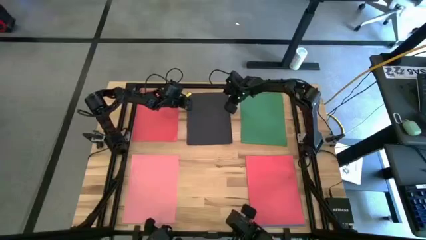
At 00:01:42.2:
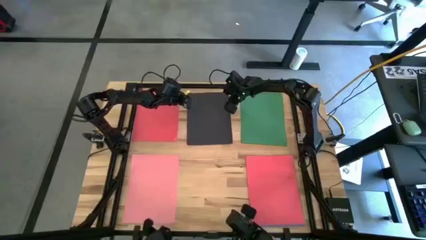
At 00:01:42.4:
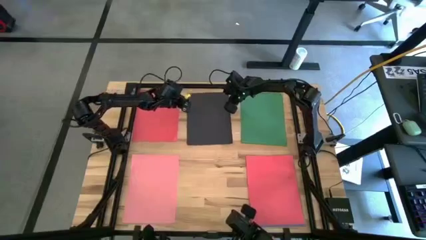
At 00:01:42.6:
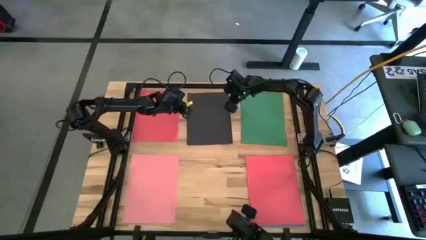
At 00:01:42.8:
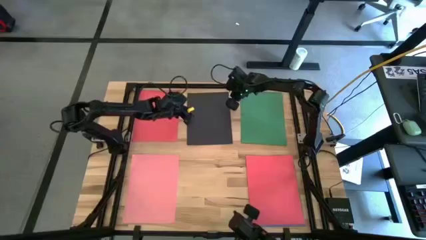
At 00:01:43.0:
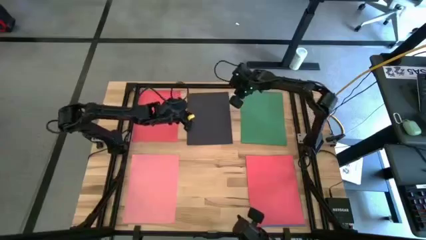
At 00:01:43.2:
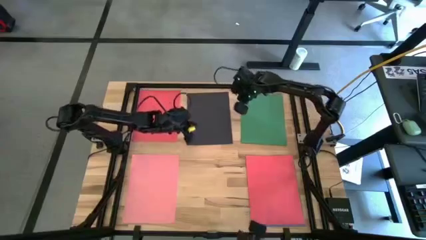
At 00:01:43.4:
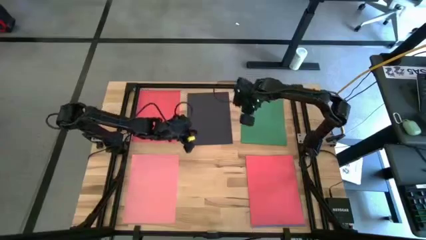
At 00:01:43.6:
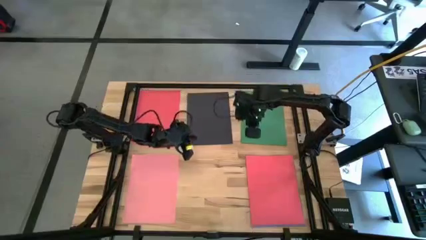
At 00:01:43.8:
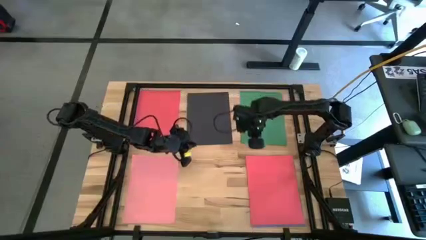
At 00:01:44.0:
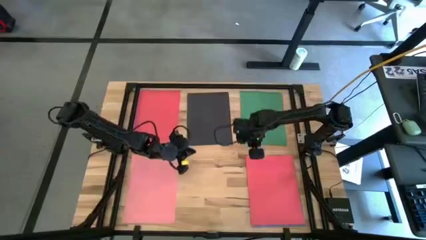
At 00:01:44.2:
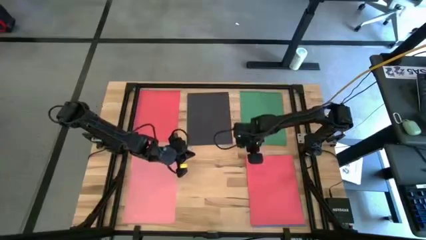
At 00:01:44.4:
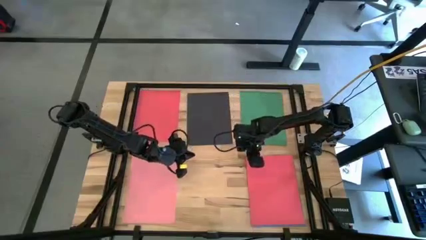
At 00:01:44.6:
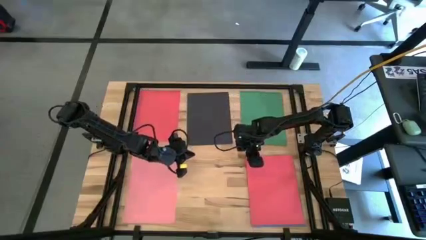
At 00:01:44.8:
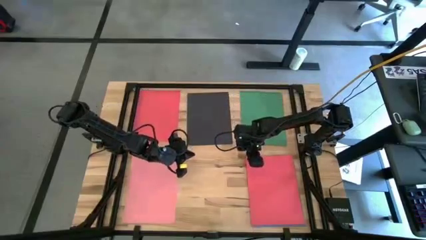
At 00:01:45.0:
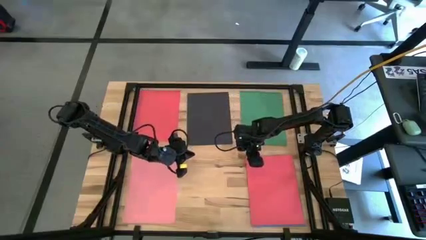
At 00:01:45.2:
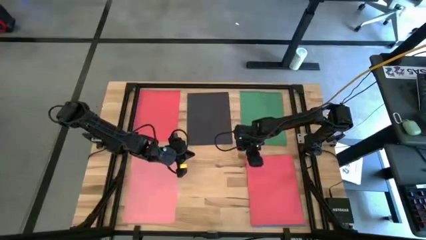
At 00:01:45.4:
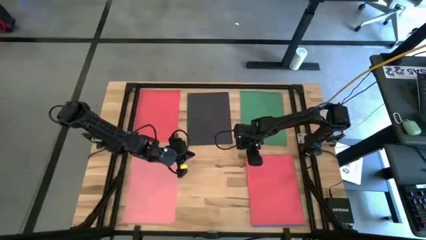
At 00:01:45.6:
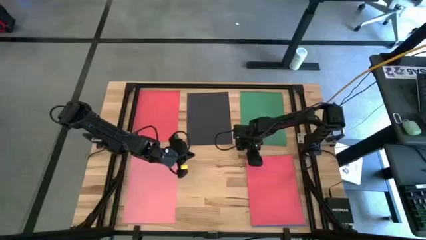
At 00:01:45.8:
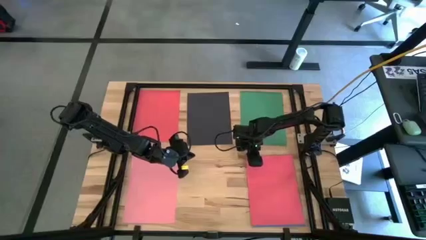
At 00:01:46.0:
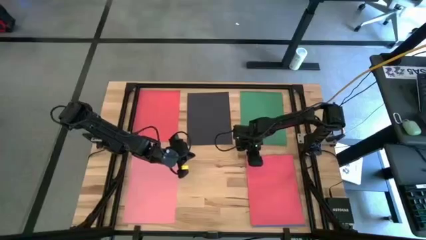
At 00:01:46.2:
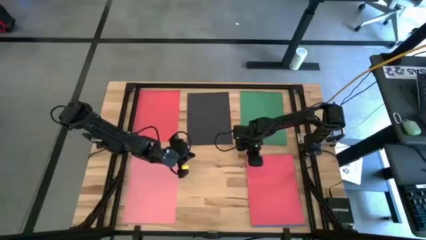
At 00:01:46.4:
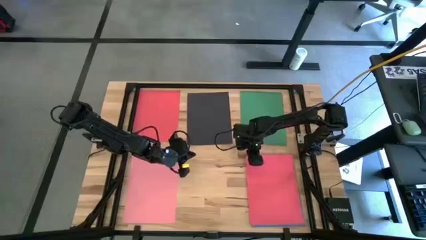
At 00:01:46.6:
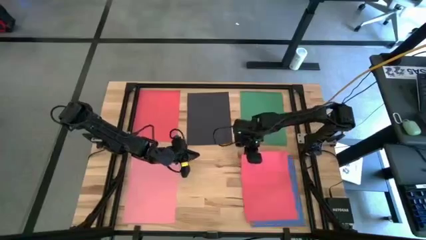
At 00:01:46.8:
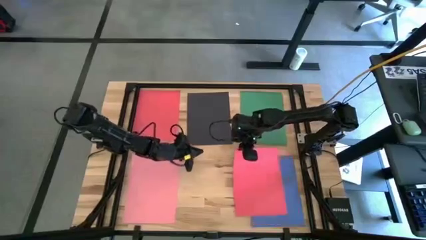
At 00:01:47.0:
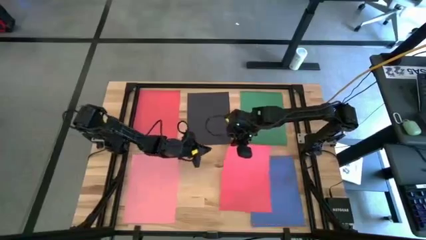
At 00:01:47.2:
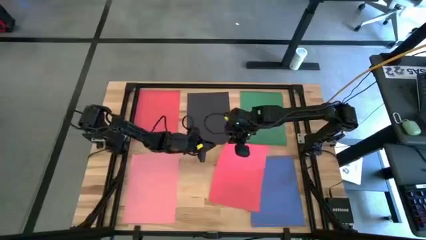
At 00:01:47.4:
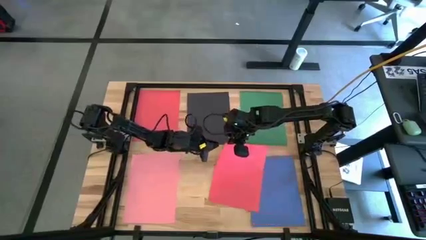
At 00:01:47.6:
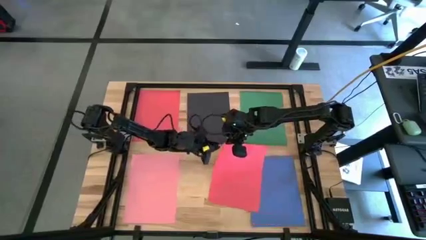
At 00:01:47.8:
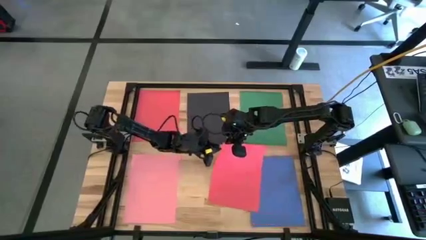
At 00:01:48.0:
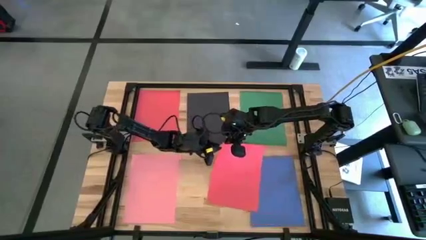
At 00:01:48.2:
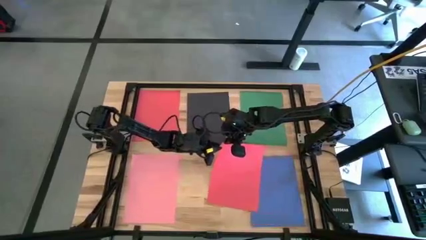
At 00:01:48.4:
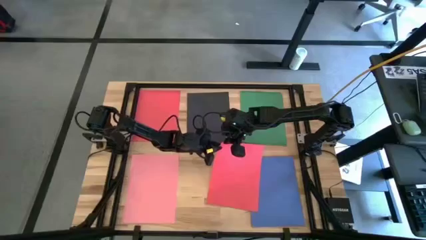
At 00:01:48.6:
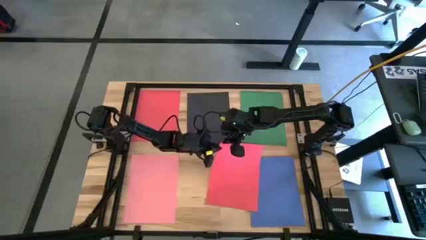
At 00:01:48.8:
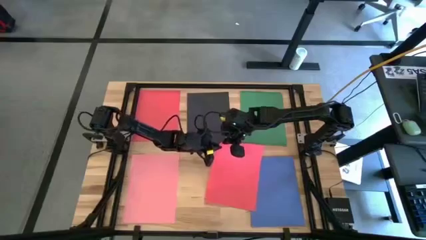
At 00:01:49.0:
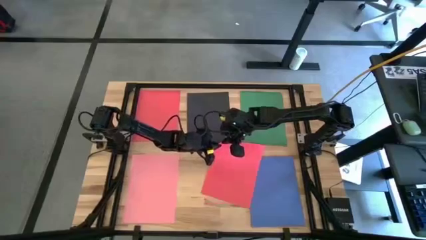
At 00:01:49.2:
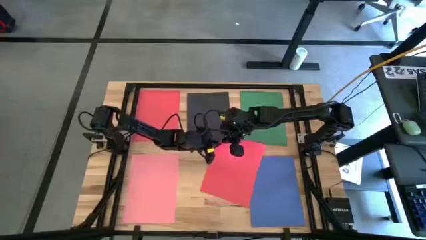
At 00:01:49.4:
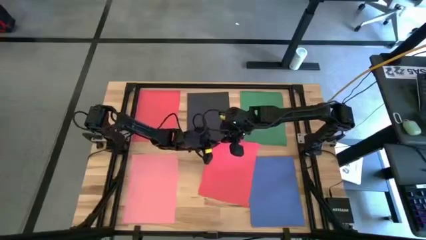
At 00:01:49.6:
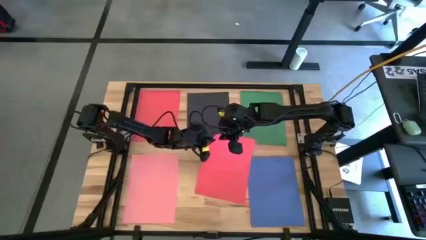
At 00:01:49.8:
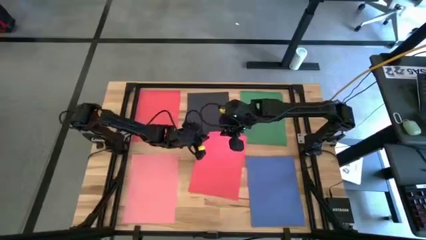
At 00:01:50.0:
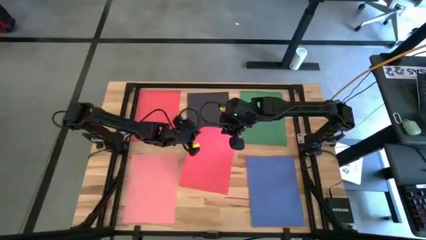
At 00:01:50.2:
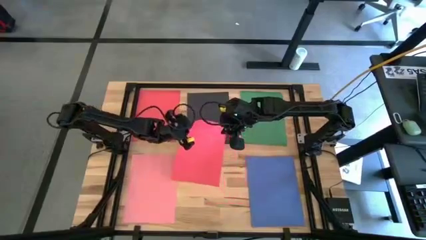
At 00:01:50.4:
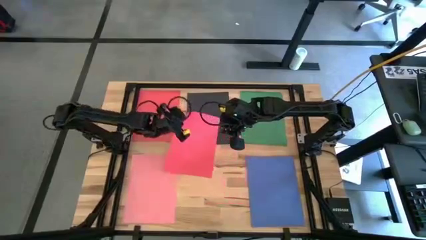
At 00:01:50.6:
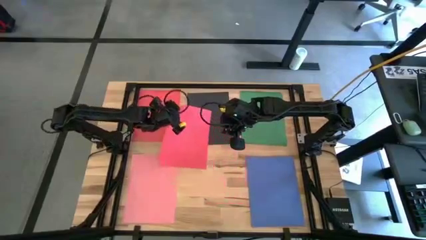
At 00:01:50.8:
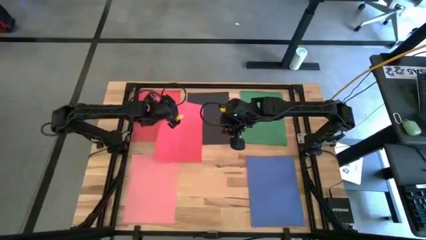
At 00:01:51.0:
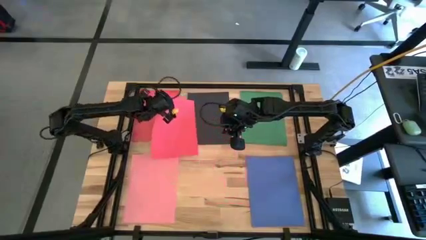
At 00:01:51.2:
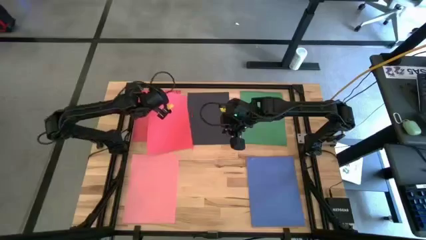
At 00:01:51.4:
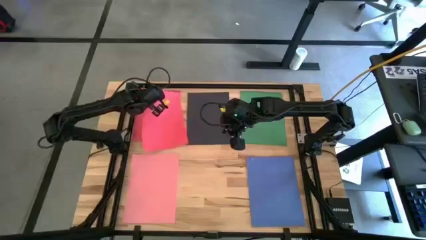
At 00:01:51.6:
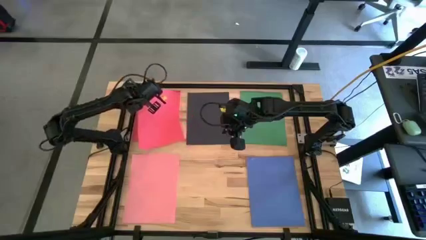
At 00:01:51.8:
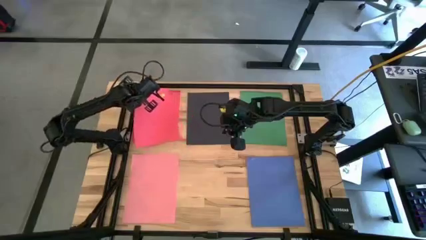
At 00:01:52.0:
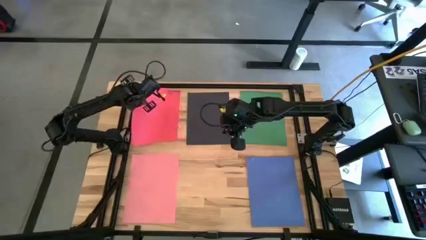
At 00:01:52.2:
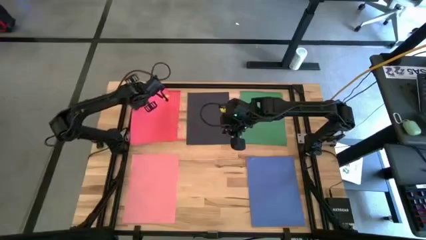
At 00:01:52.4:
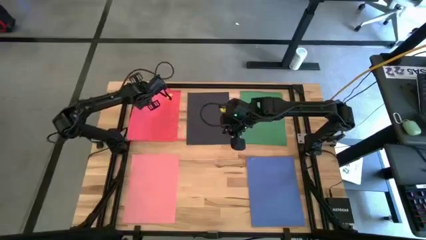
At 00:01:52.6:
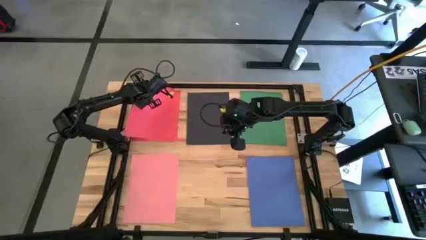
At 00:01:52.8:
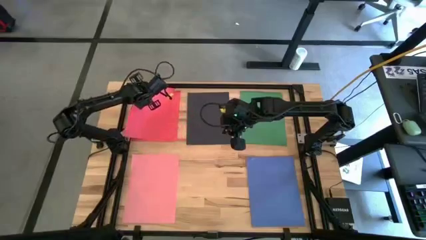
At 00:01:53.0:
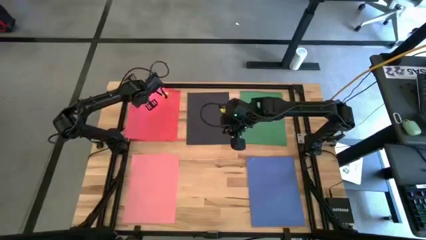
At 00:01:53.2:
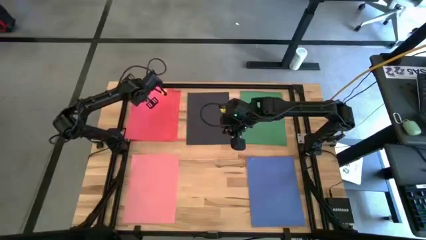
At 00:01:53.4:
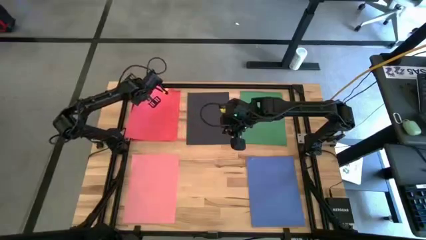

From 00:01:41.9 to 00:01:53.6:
Task: Organize paper
Stack the red paper on the red paper at the top left of the table
